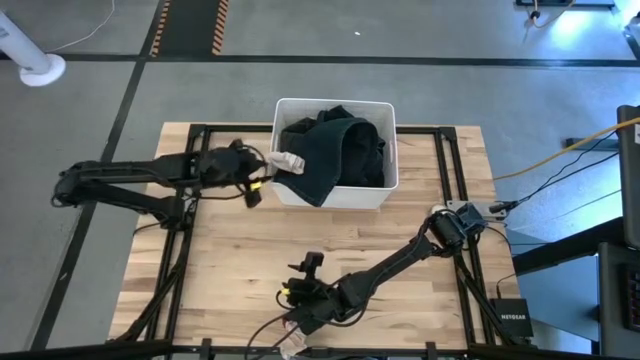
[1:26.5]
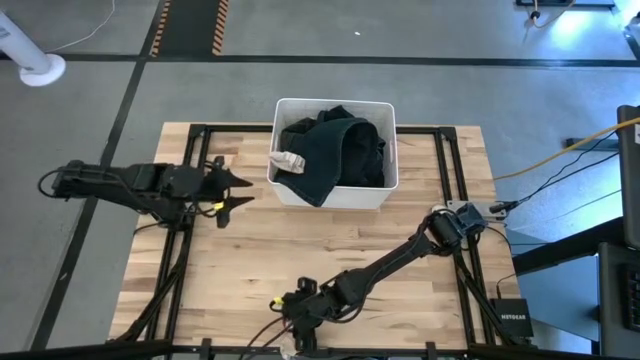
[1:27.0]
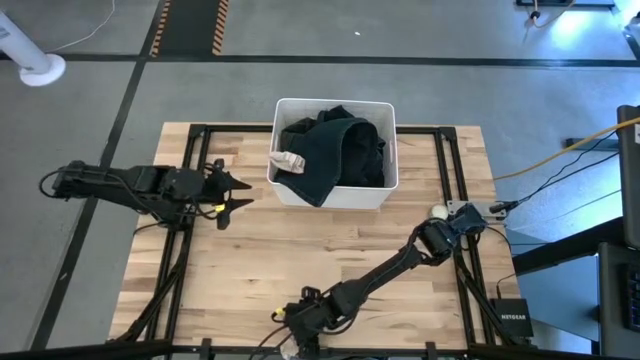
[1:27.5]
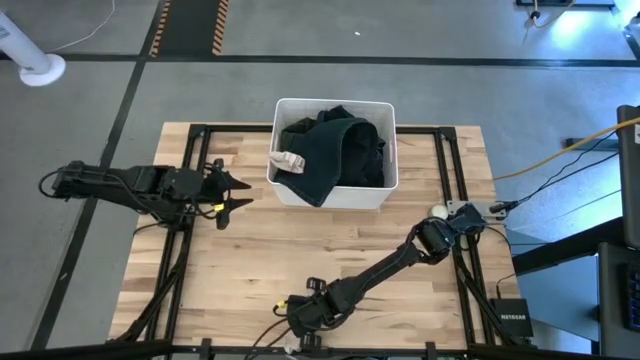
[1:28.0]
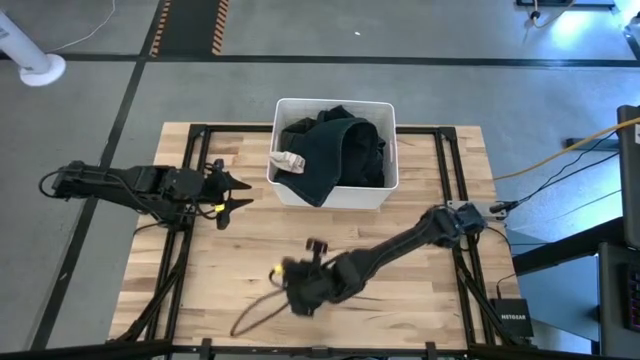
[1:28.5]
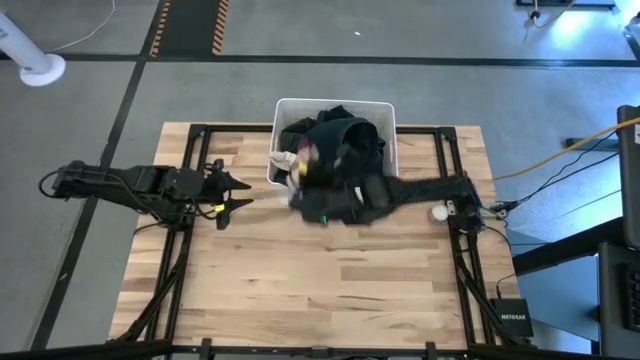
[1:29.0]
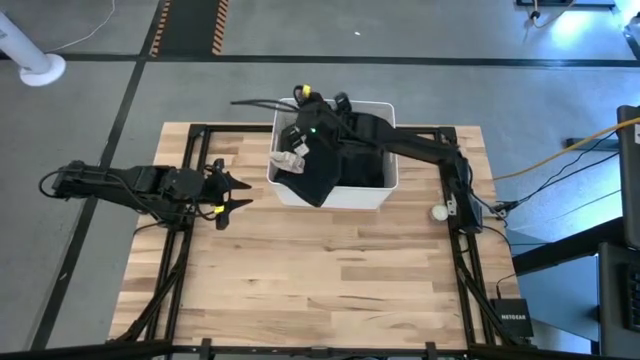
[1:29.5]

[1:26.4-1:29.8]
Task: Sort clothes
Put the red sock into the white laundry organizer

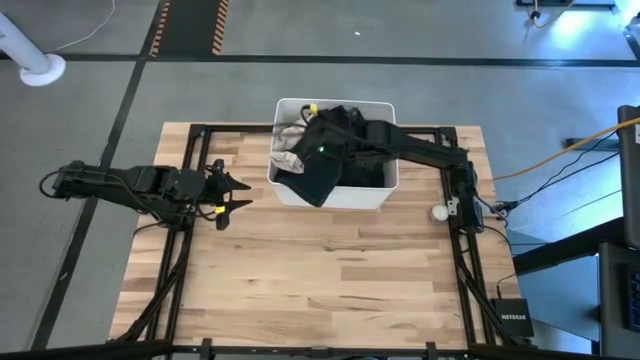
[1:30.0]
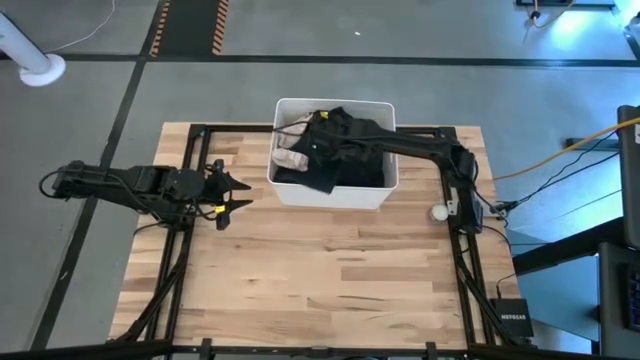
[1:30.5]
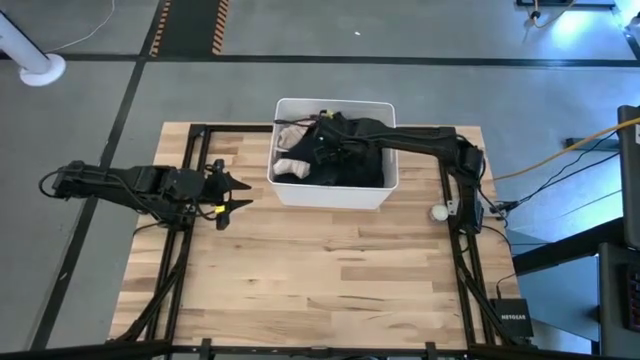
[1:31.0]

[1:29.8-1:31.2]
Adjust the blue pants on the white laundry organizer

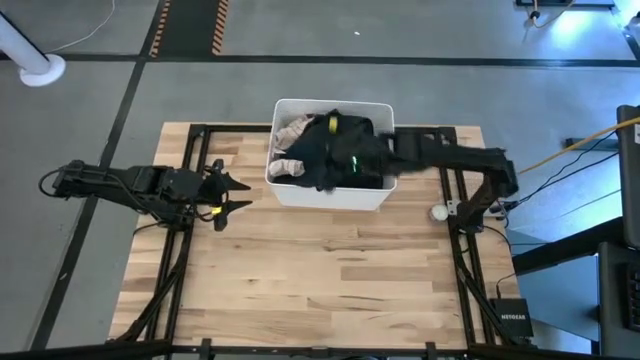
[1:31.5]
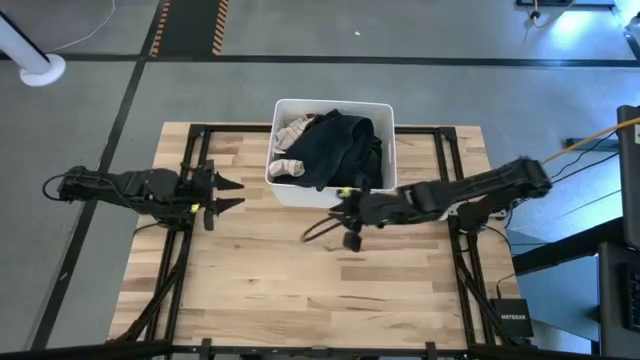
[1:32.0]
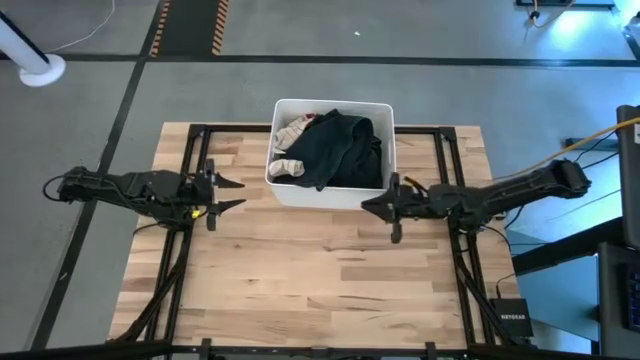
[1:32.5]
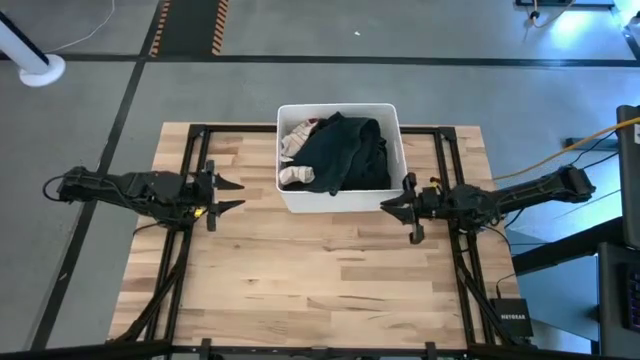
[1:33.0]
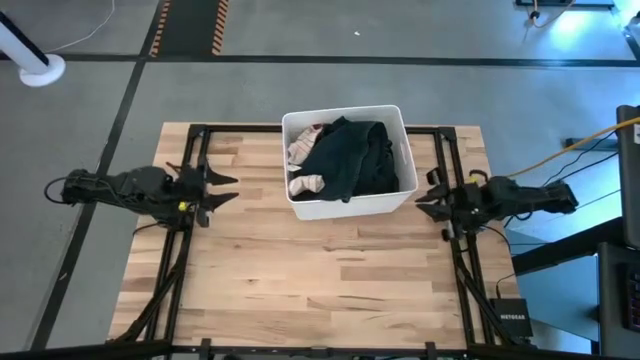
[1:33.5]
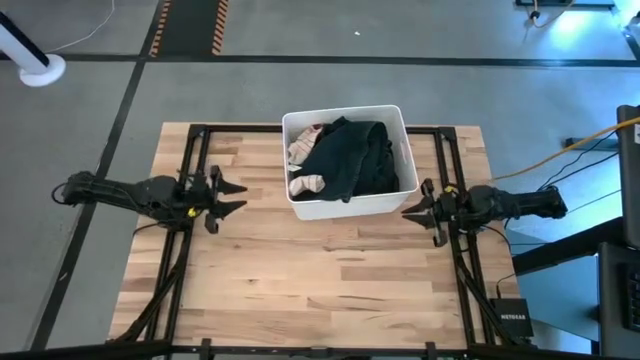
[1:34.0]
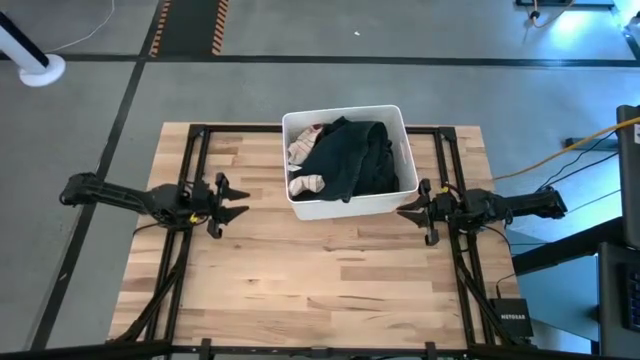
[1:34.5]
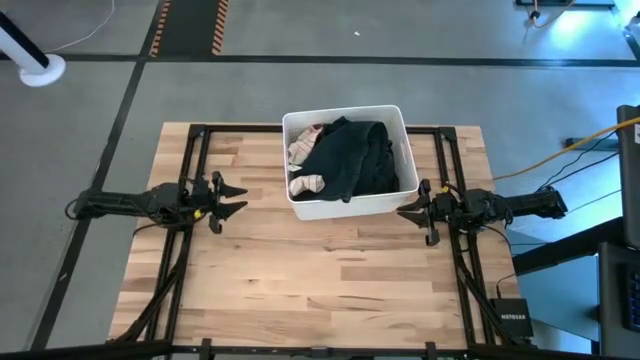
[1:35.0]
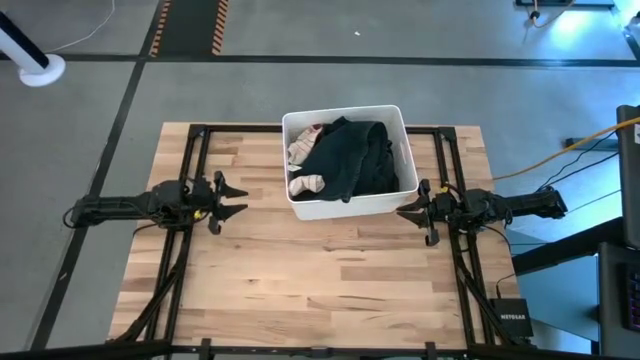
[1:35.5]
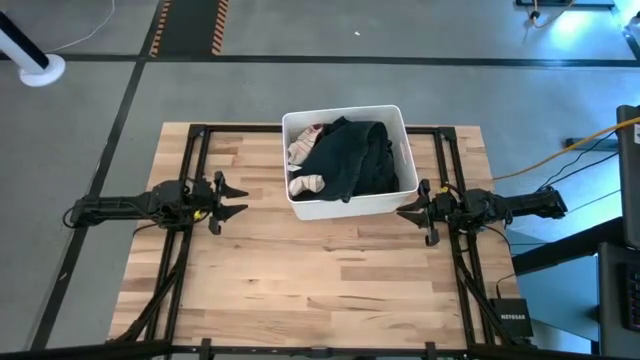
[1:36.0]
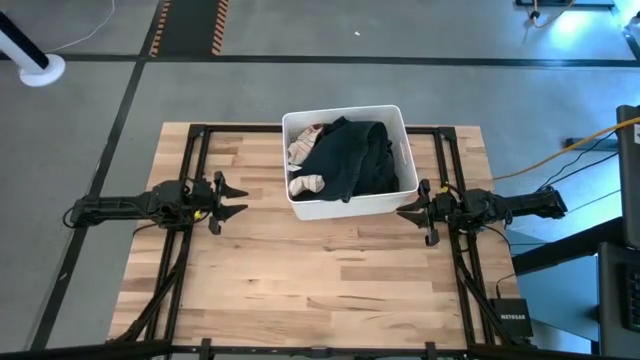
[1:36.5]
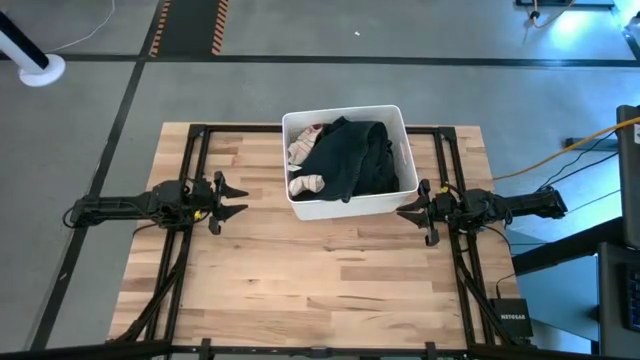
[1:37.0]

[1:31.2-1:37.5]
Return to Home Position

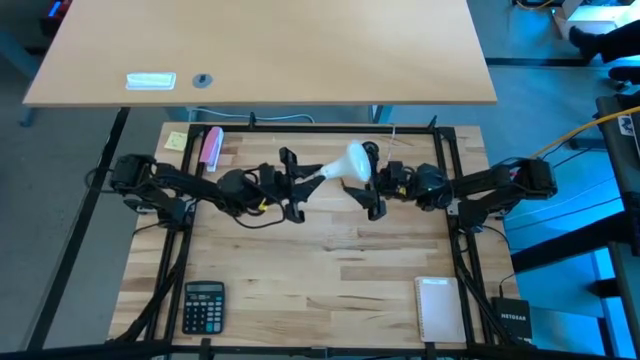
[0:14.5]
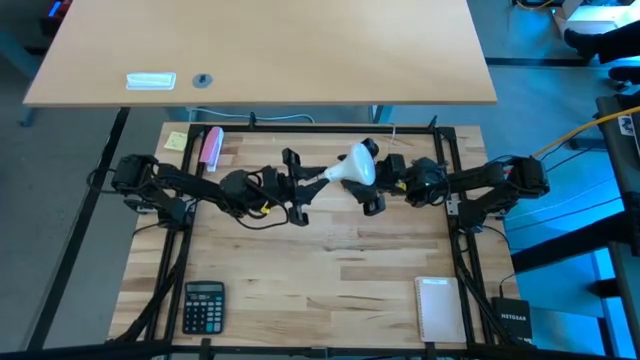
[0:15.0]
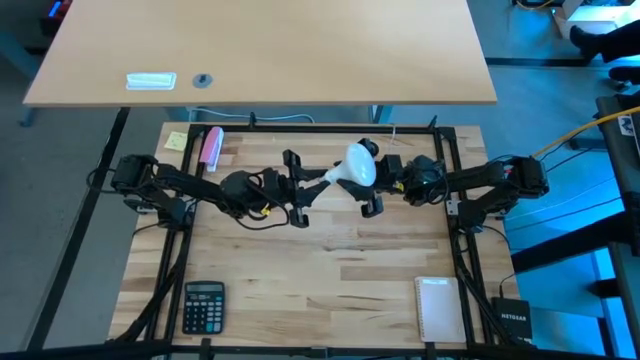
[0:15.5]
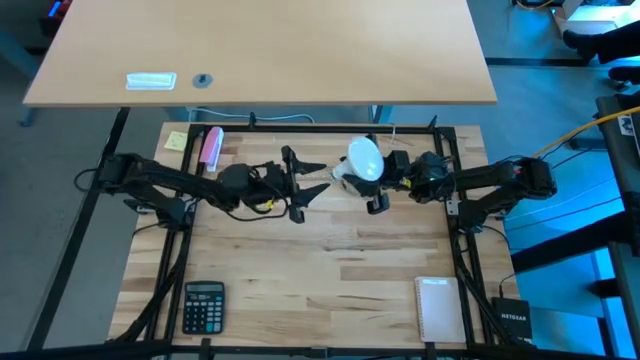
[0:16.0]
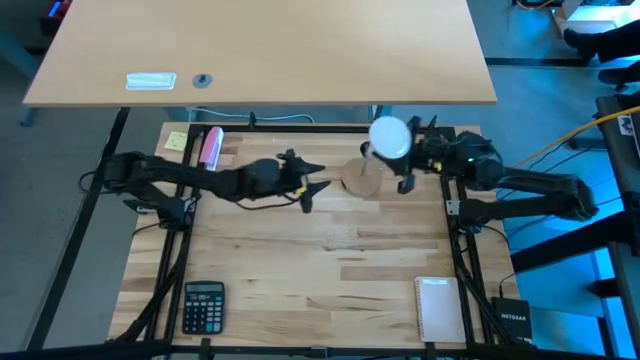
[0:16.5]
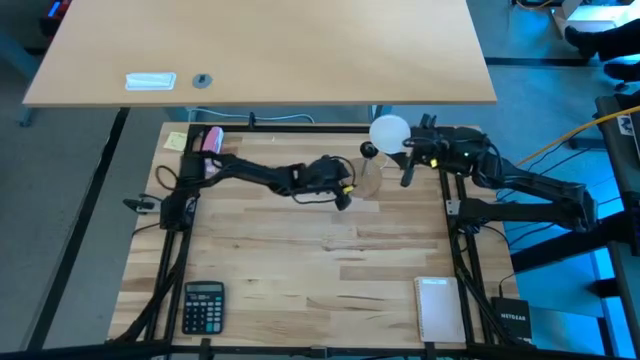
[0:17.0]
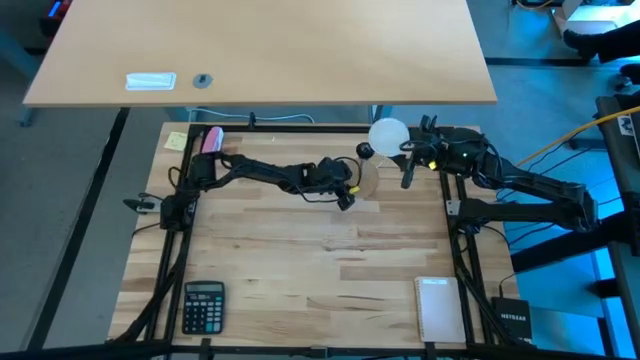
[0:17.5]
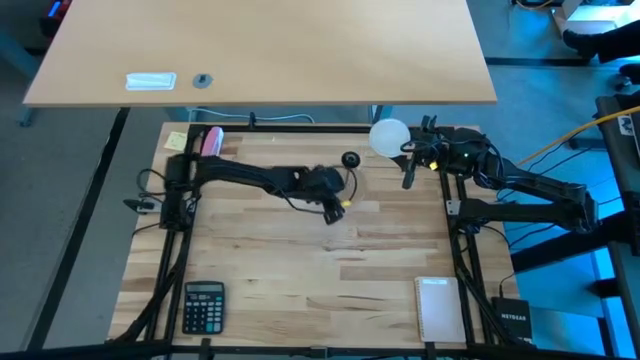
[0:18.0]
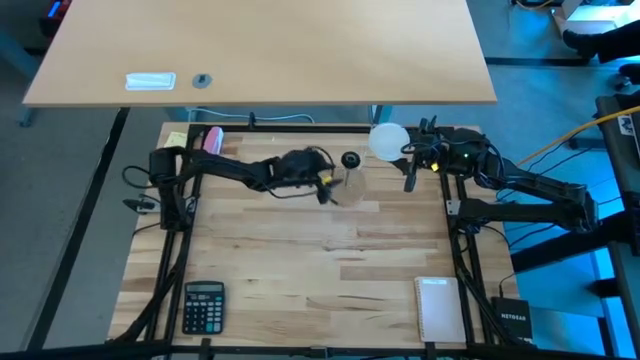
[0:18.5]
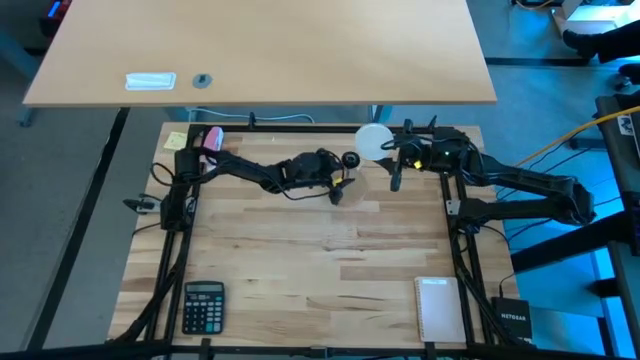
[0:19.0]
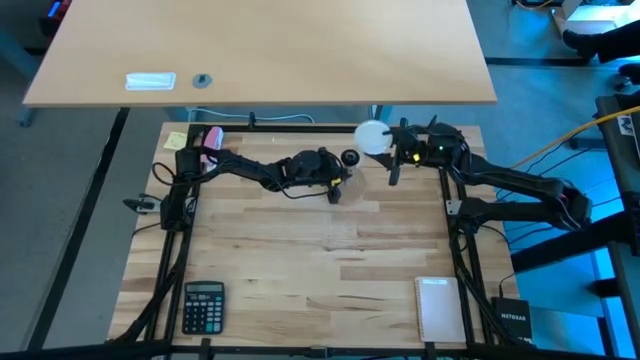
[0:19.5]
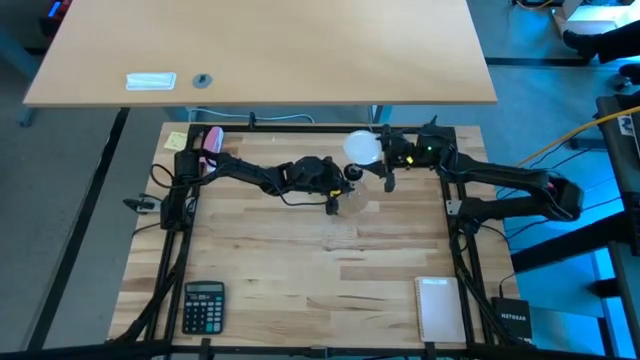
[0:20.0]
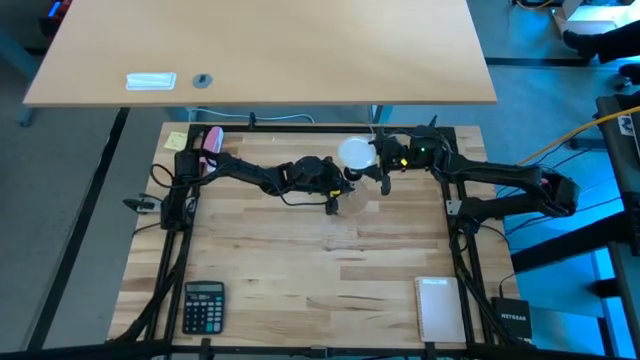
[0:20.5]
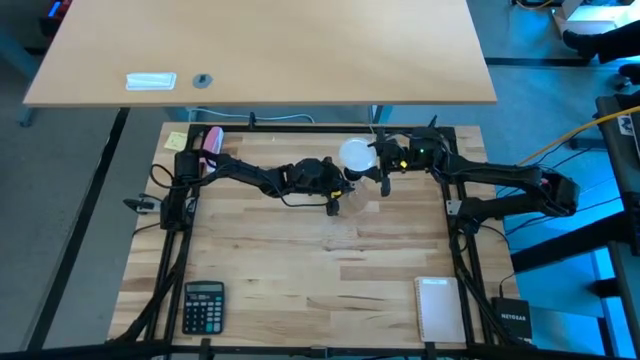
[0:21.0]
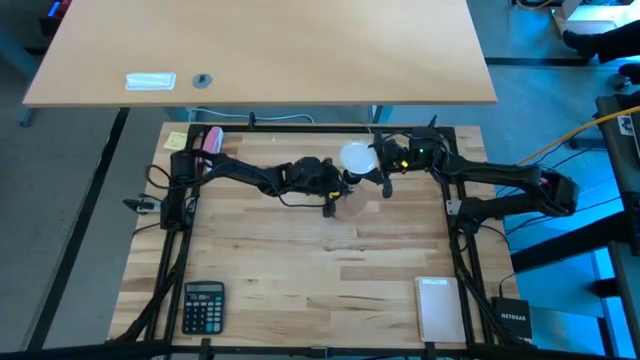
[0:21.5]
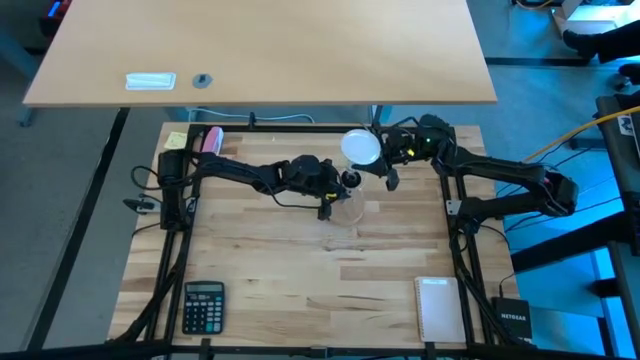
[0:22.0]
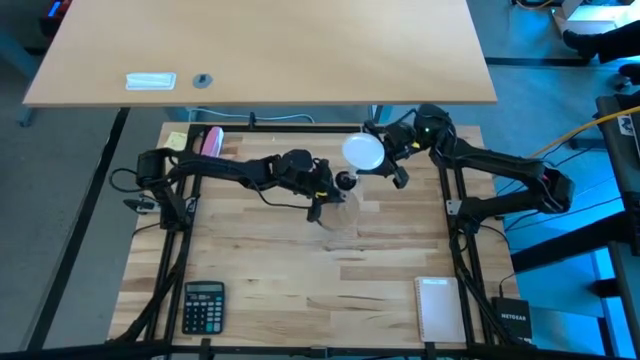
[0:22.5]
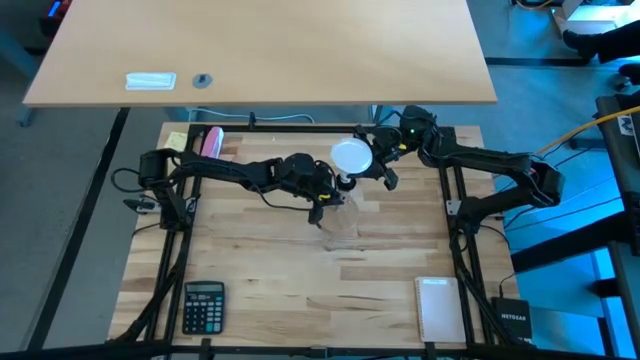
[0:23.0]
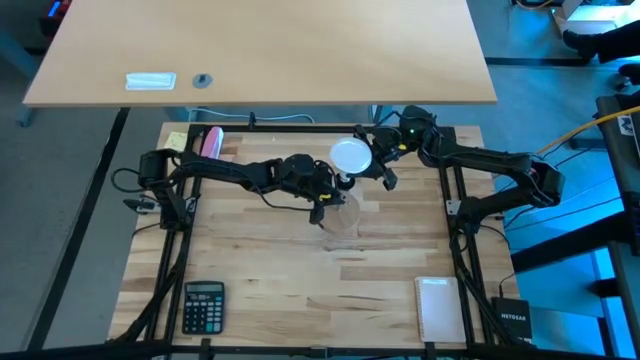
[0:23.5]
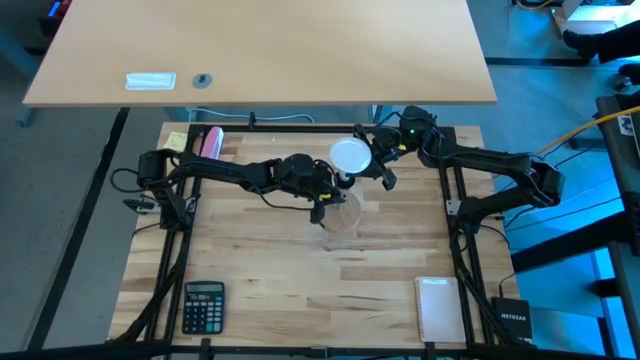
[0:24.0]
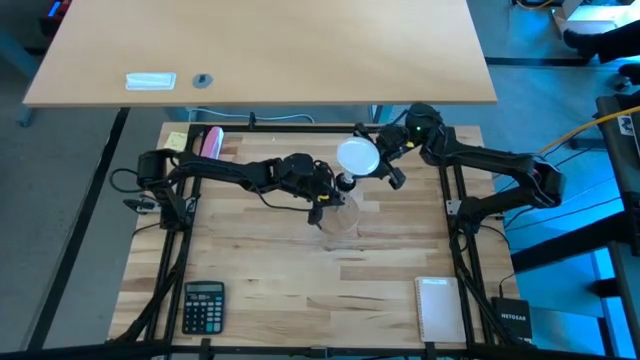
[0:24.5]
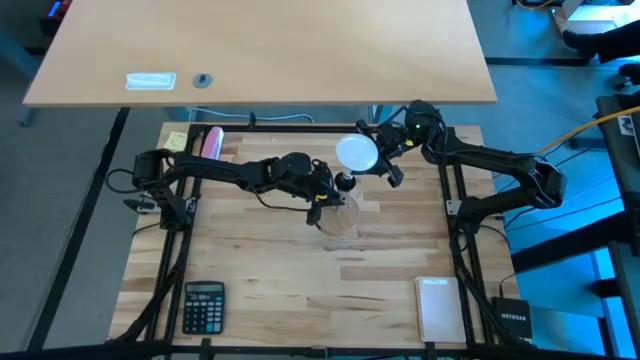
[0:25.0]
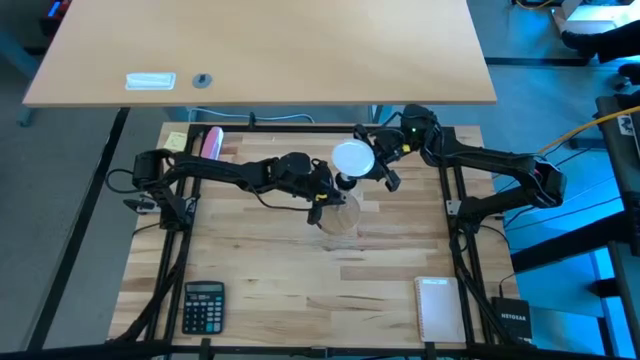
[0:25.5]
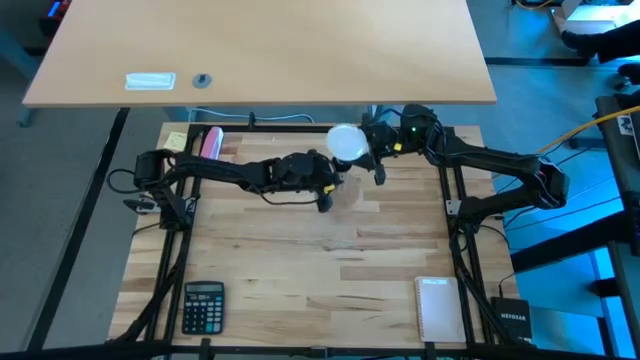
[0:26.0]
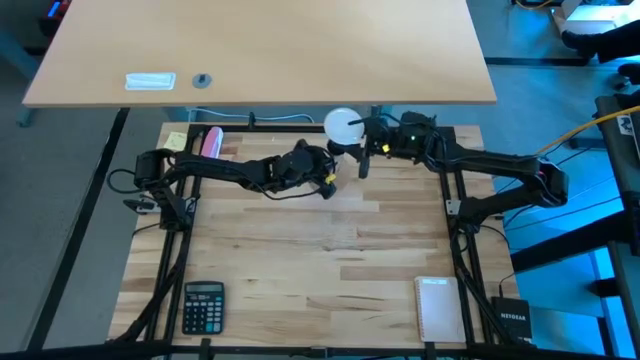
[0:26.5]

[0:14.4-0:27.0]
Task: Screw lightbulb
Insert the white lightbulb into the lamp
